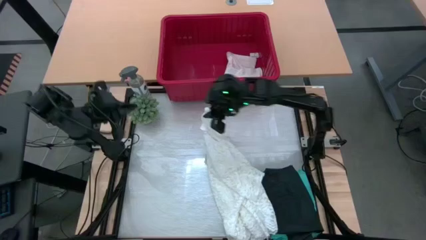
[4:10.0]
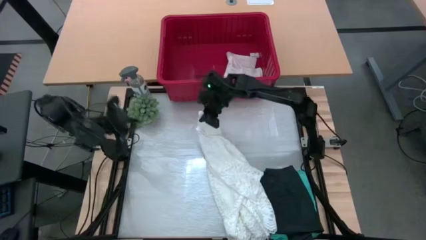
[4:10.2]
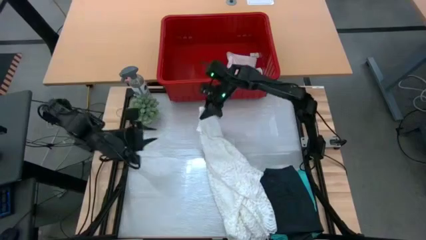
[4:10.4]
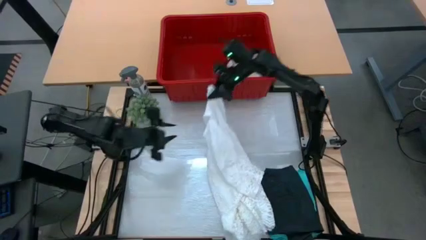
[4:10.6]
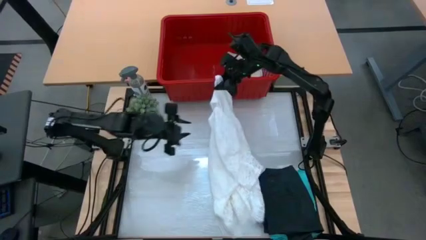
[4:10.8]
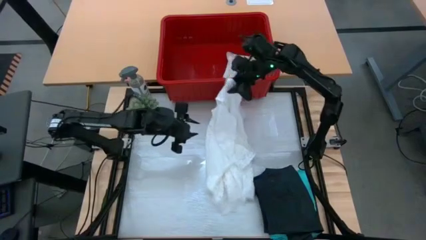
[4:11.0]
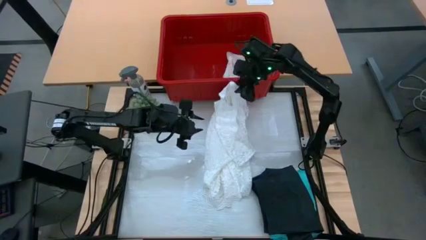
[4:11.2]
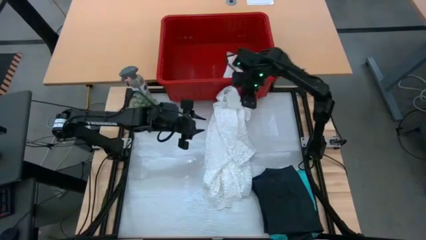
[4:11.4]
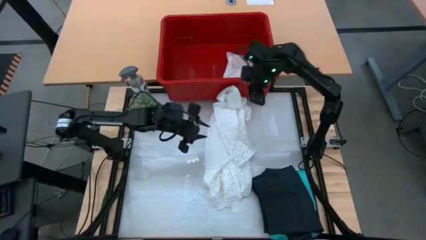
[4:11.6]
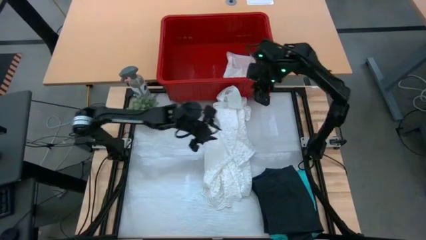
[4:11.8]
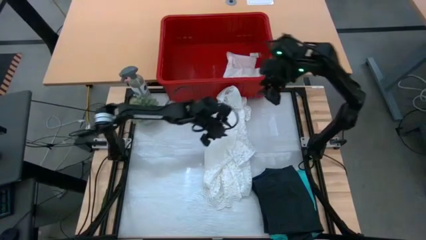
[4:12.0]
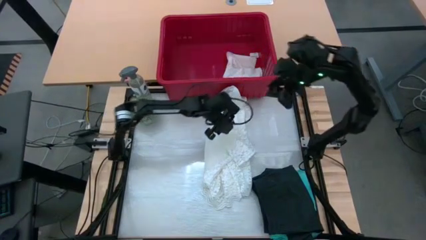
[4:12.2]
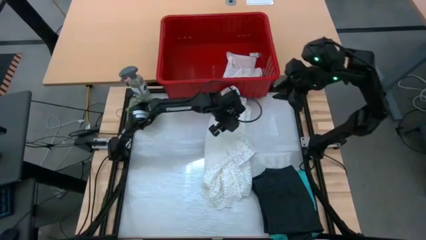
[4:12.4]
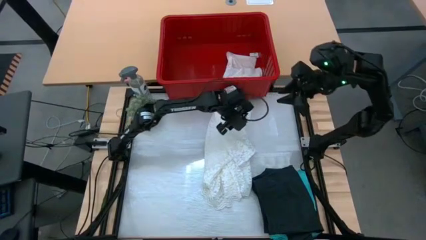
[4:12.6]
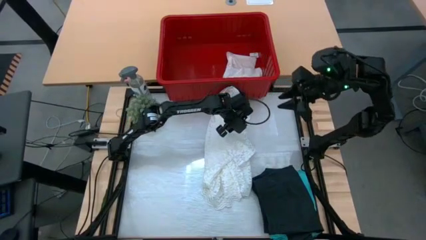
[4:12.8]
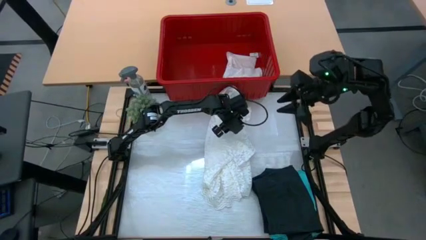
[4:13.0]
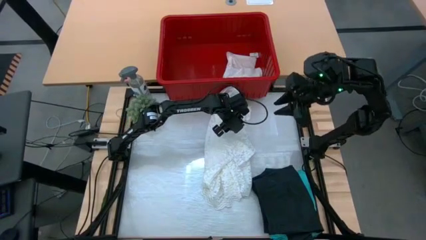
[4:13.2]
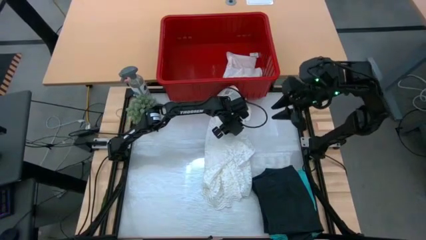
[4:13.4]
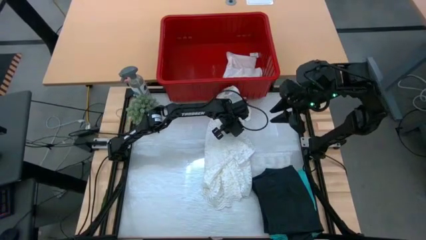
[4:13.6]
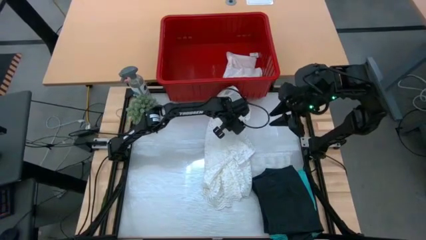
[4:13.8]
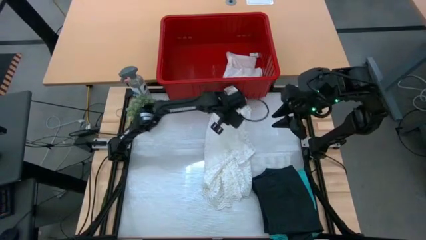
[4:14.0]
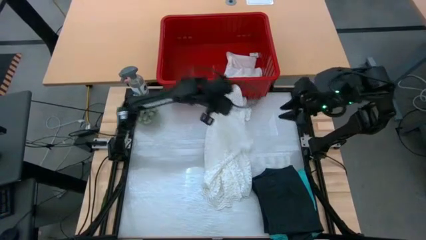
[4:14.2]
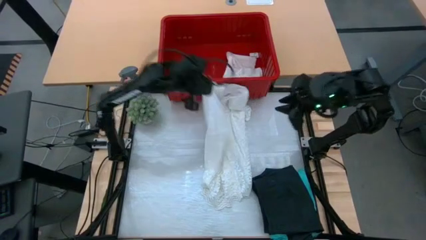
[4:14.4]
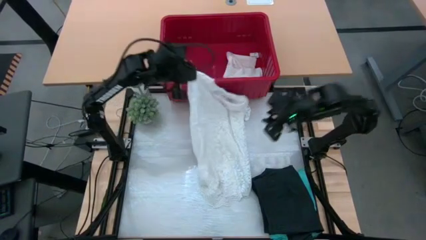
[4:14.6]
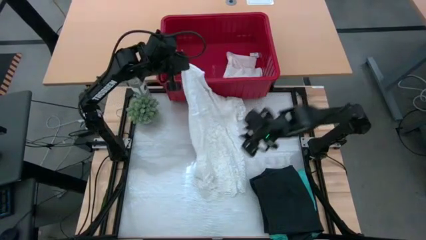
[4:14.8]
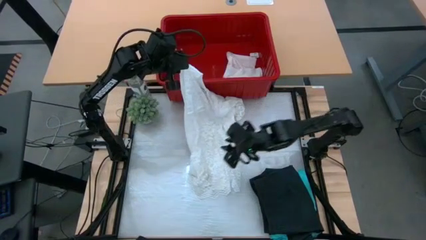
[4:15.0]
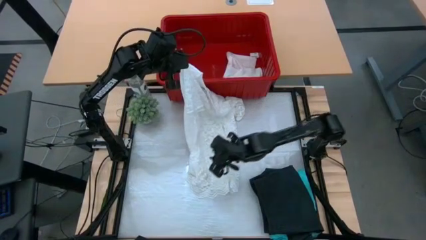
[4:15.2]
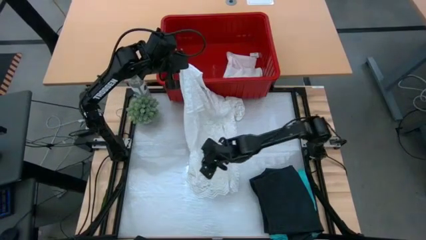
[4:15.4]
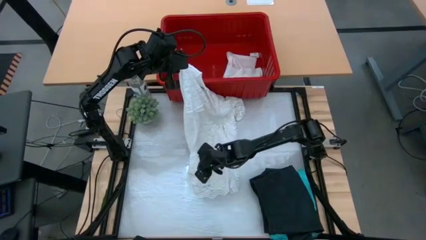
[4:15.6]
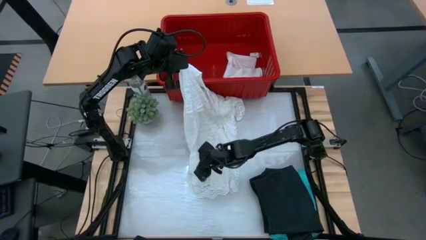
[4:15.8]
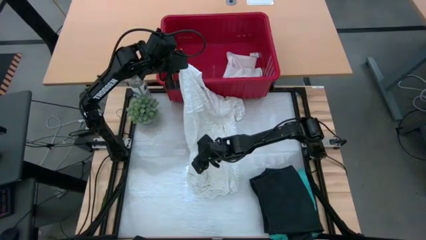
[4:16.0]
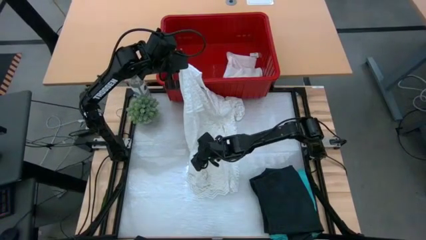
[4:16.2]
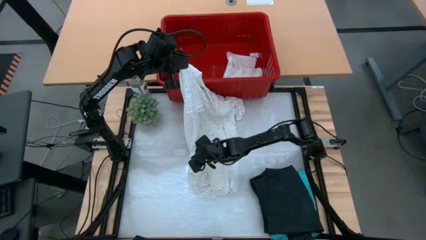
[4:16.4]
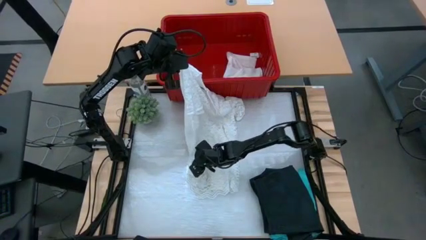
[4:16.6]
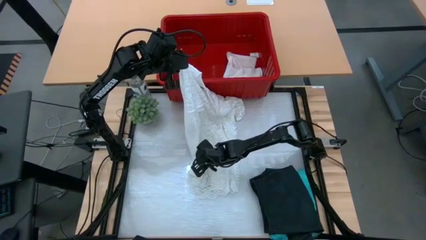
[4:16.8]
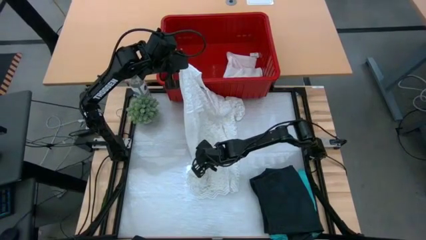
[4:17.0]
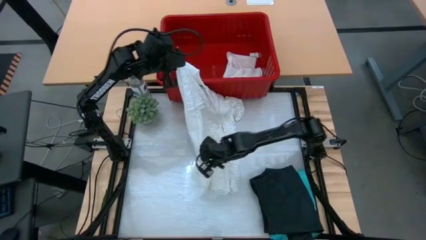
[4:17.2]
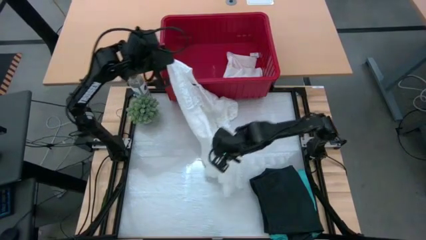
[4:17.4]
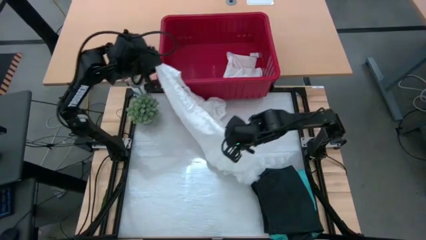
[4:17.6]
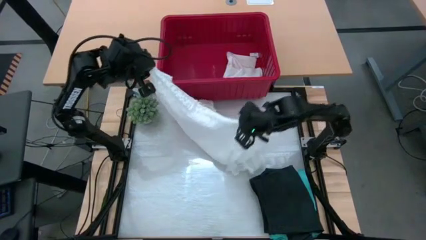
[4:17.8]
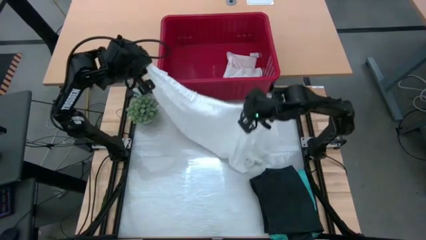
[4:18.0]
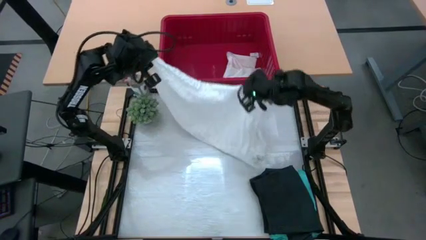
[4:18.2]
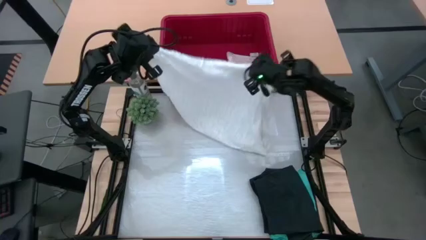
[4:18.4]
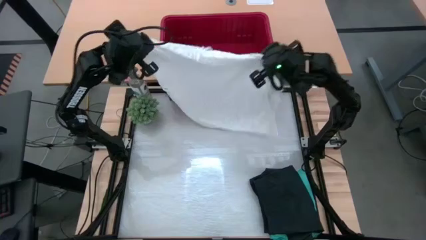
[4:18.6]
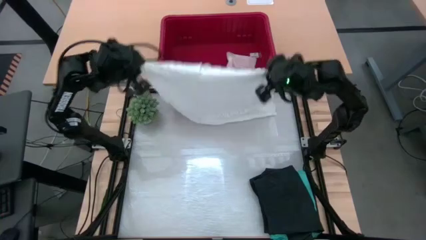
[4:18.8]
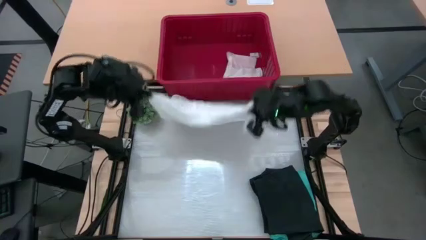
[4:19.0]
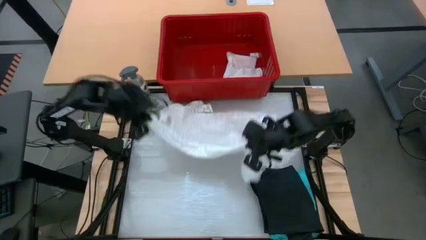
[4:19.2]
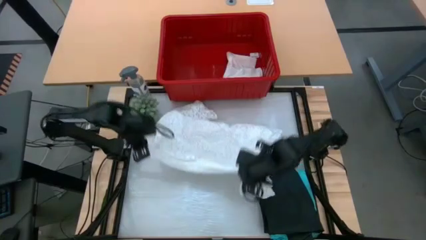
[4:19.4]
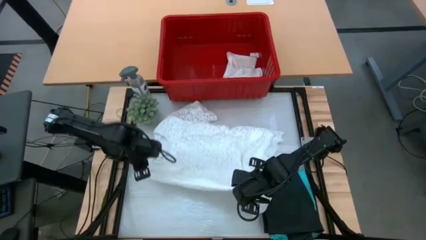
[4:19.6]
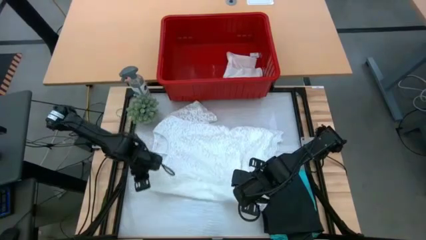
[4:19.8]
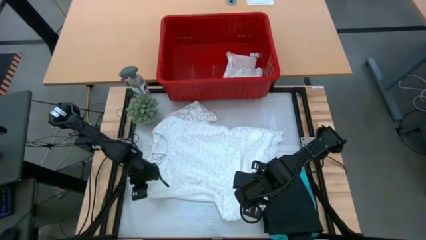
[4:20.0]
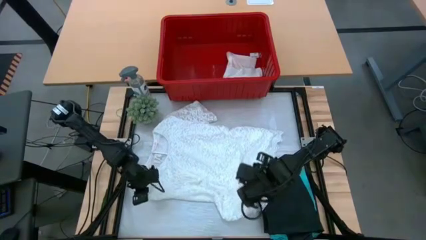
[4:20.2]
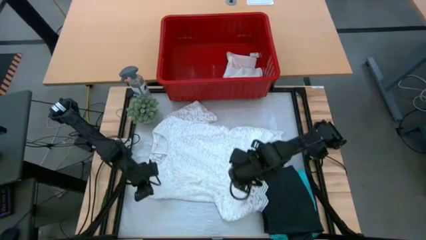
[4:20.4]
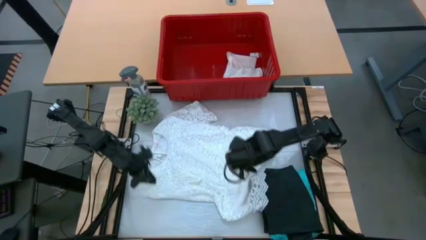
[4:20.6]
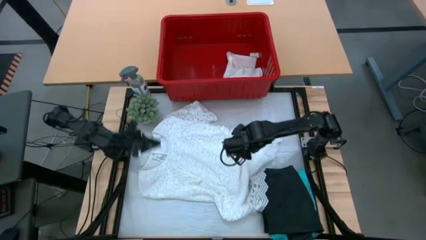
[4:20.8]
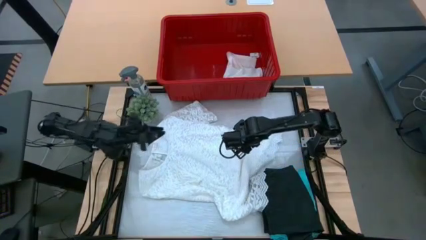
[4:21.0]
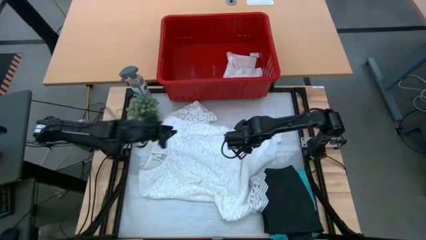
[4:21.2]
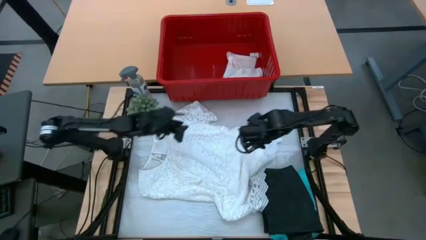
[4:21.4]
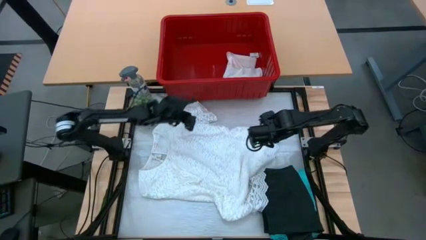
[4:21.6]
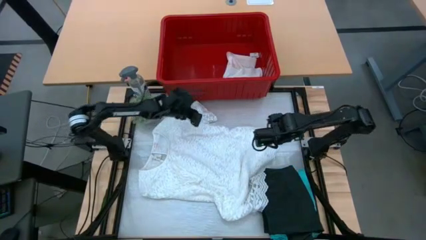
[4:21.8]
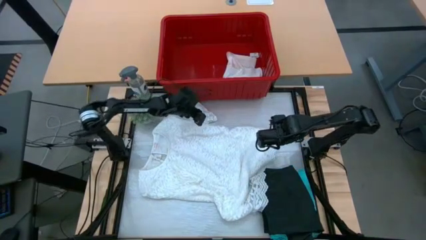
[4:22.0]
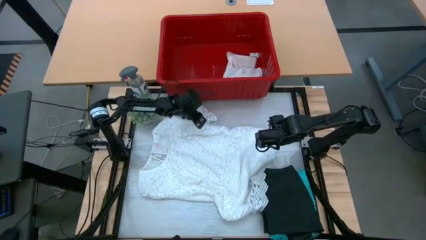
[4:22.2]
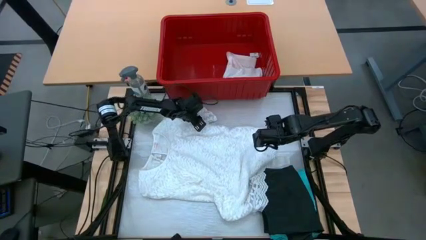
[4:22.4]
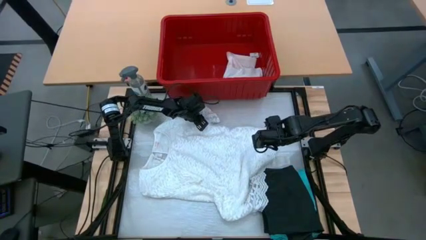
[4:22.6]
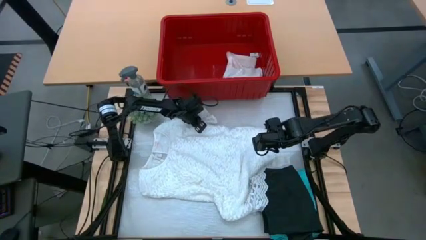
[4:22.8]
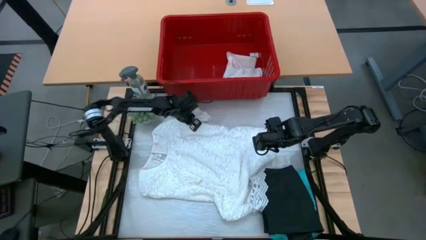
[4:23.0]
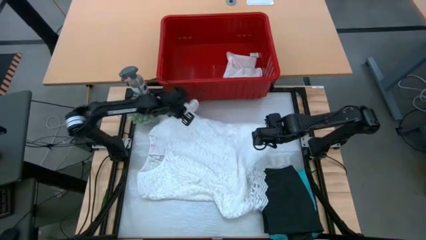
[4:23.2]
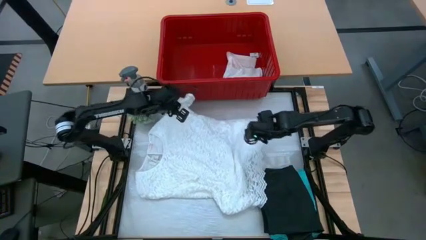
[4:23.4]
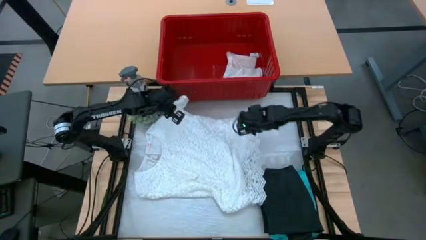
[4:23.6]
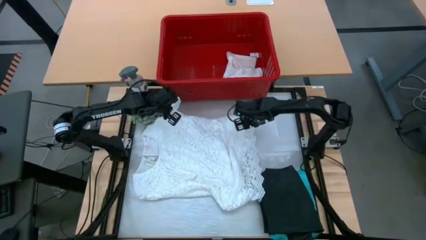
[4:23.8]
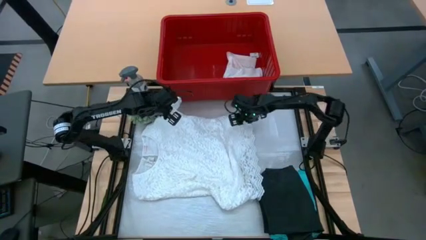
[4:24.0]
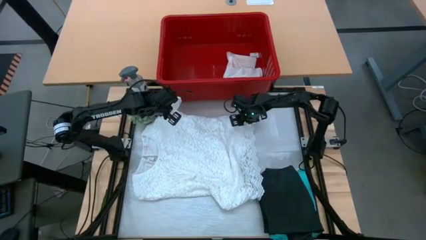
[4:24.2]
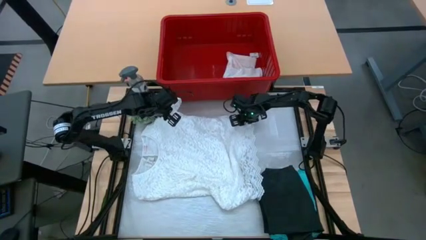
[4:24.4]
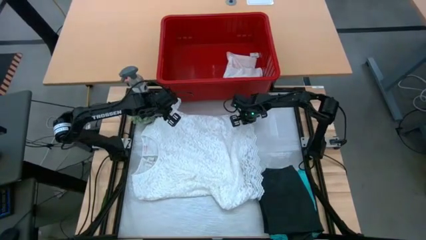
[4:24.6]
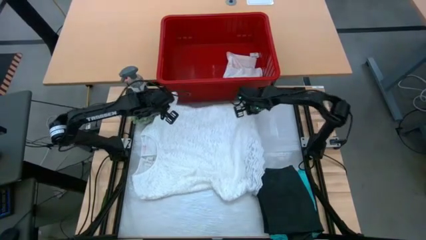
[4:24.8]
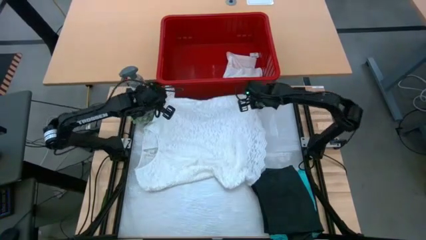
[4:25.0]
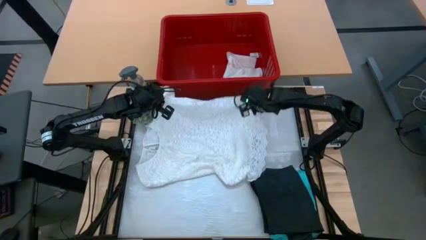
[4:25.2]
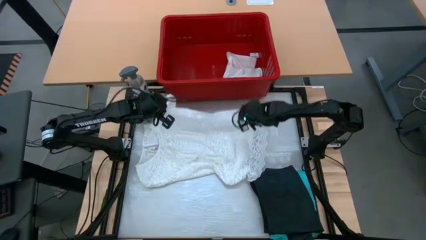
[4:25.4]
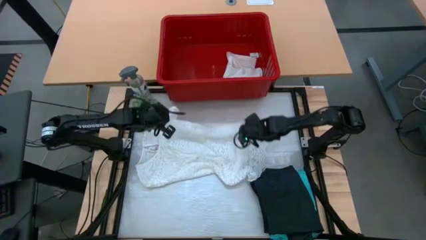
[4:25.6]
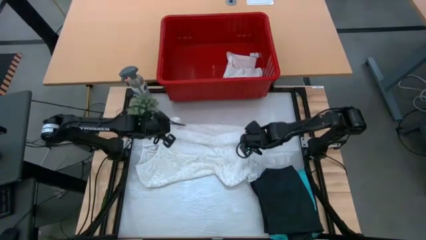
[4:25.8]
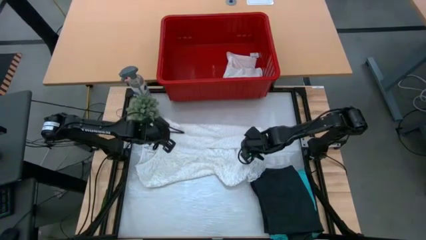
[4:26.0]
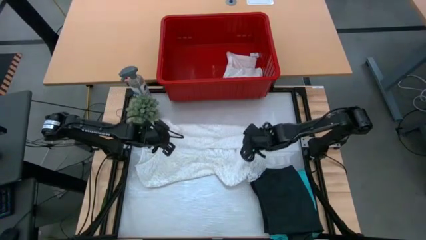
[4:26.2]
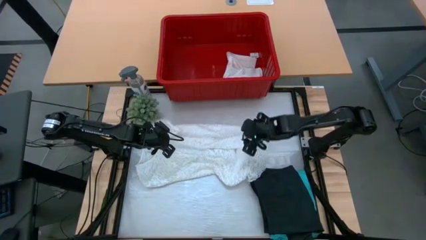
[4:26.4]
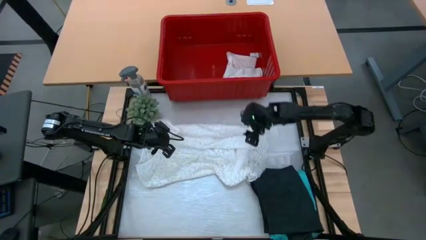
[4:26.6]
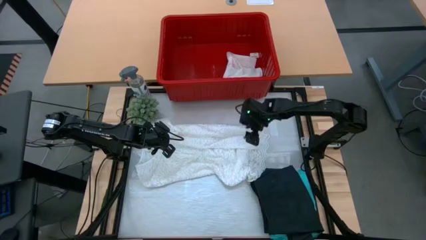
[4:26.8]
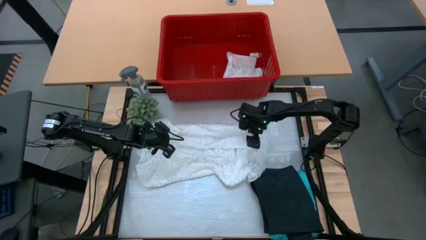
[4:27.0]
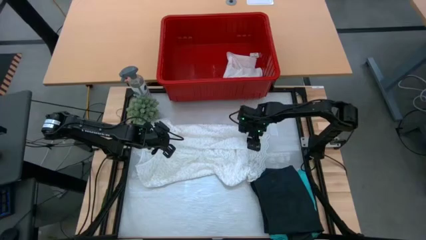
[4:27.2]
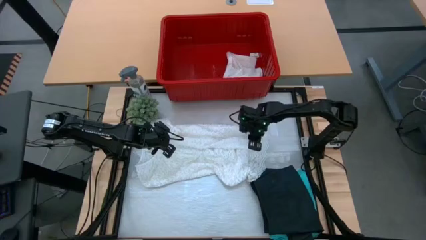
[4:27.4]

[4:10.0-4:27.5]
Task: Fold Laundry from Bin
Fold the white t-shirt
